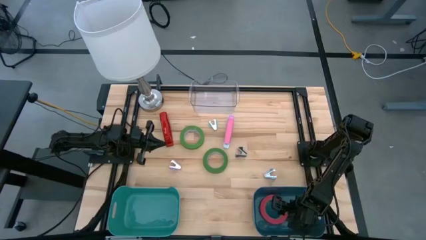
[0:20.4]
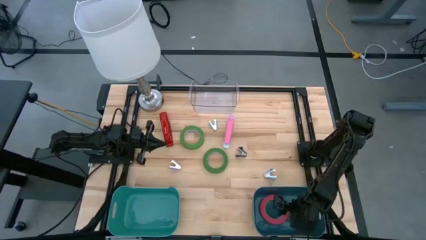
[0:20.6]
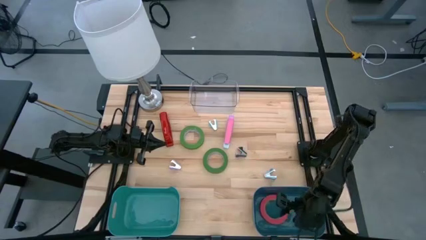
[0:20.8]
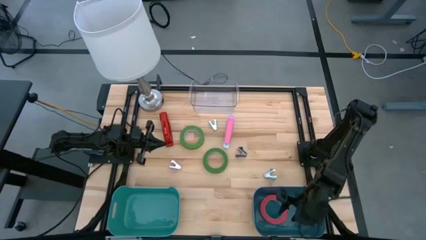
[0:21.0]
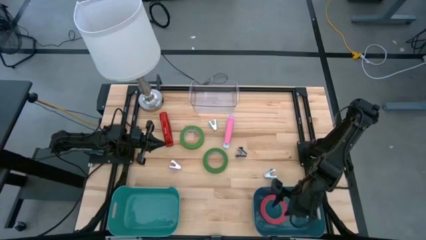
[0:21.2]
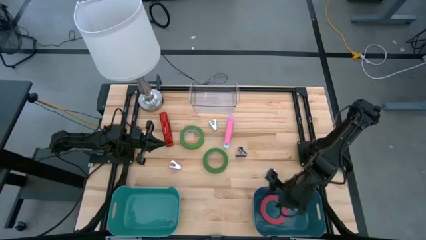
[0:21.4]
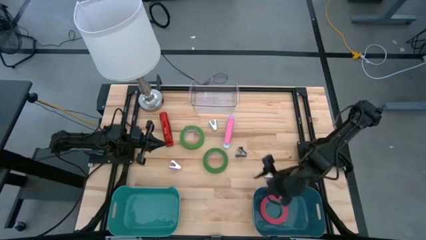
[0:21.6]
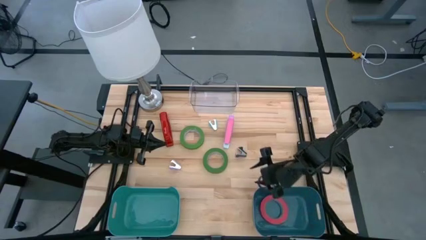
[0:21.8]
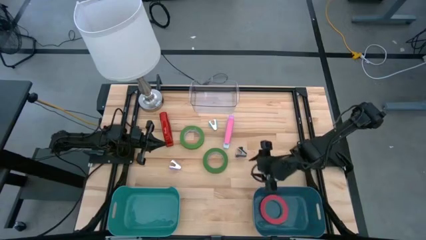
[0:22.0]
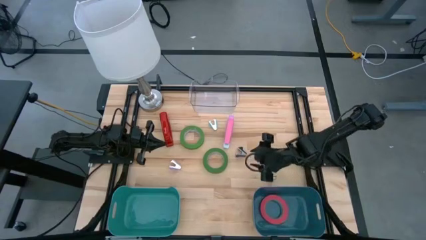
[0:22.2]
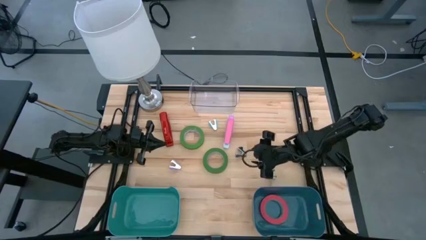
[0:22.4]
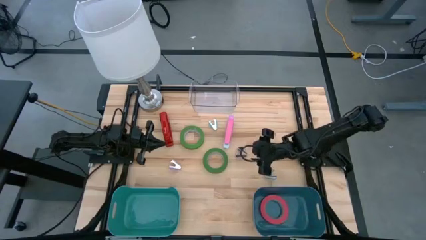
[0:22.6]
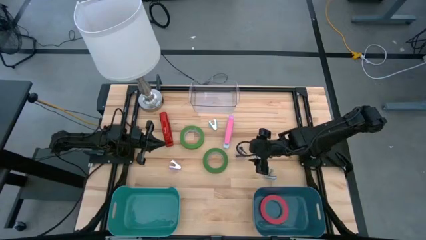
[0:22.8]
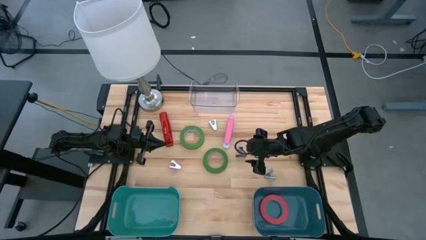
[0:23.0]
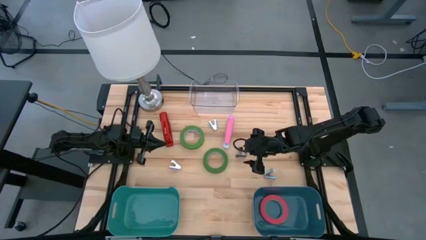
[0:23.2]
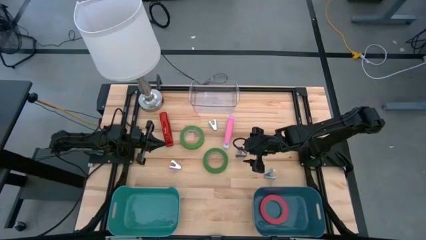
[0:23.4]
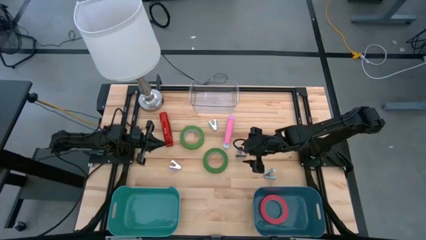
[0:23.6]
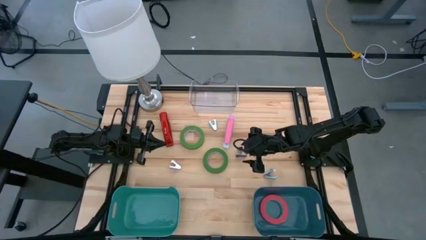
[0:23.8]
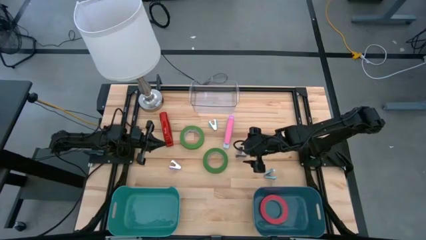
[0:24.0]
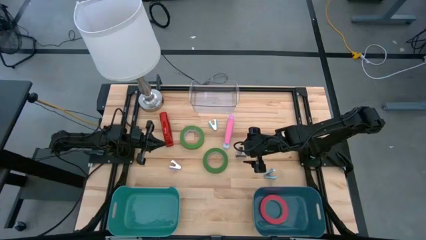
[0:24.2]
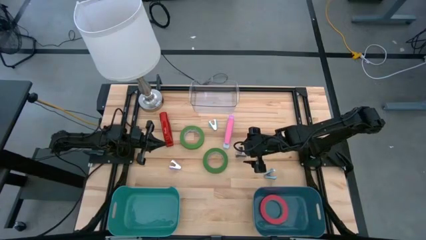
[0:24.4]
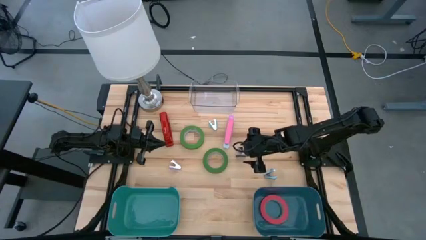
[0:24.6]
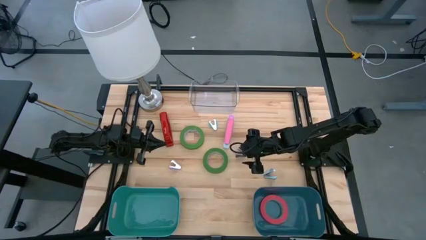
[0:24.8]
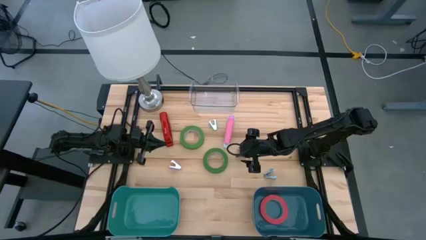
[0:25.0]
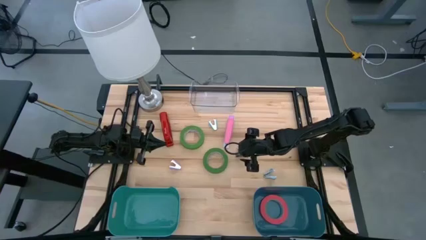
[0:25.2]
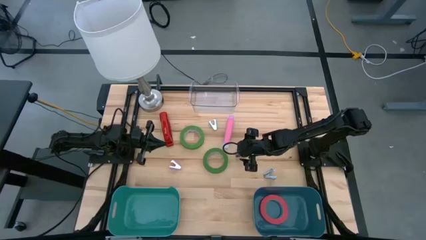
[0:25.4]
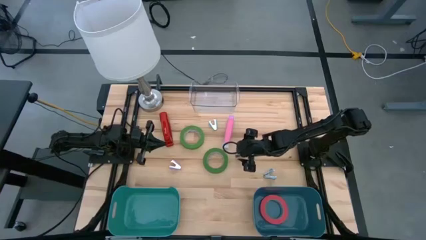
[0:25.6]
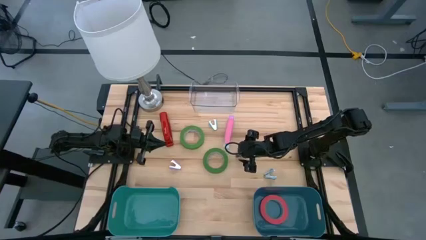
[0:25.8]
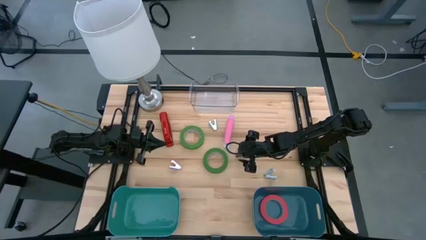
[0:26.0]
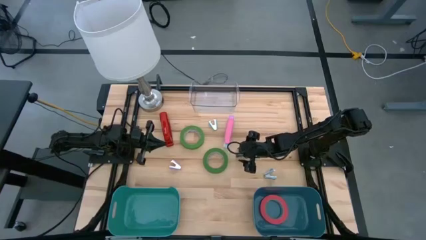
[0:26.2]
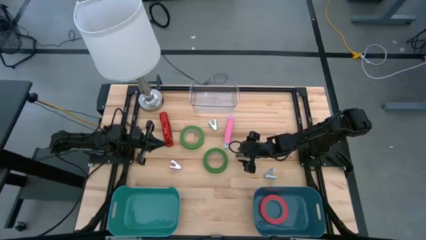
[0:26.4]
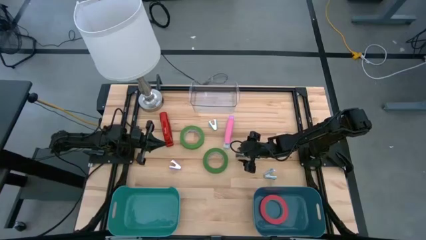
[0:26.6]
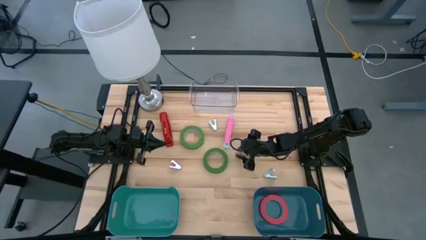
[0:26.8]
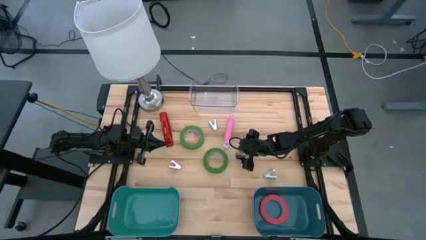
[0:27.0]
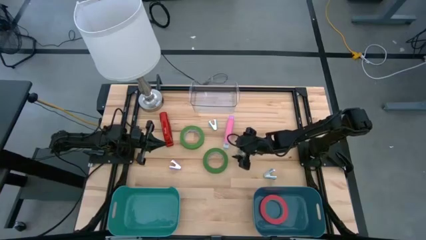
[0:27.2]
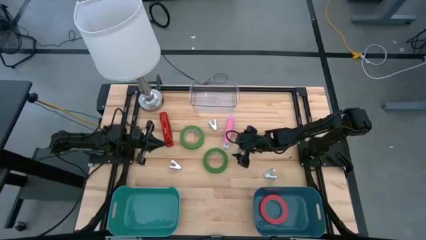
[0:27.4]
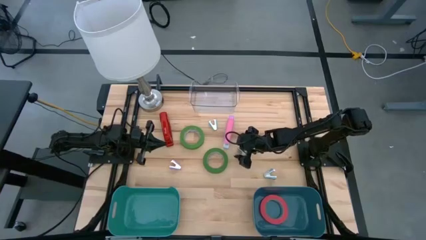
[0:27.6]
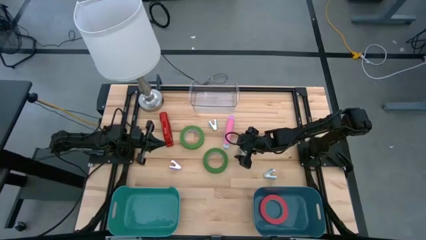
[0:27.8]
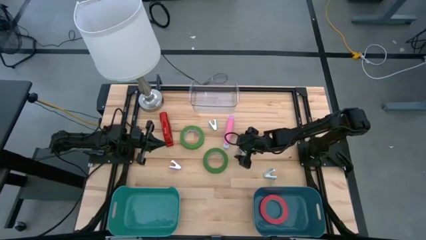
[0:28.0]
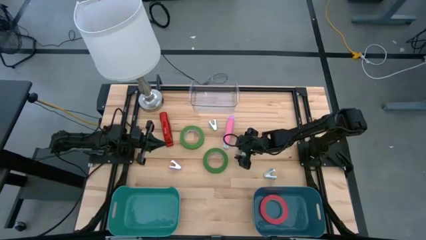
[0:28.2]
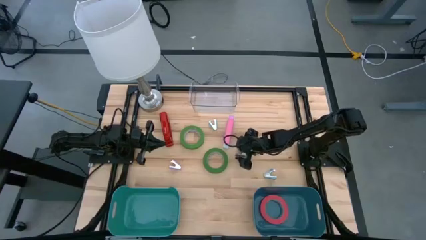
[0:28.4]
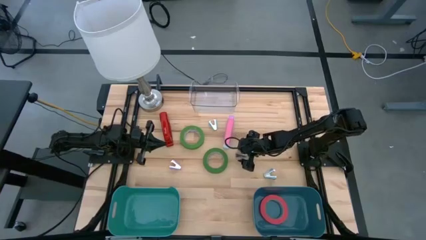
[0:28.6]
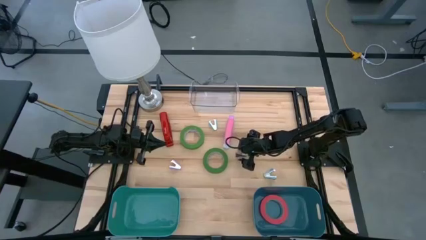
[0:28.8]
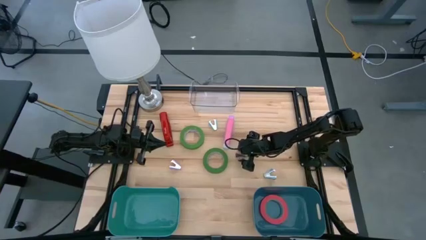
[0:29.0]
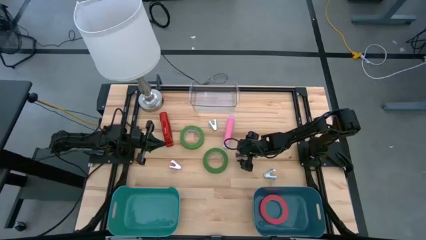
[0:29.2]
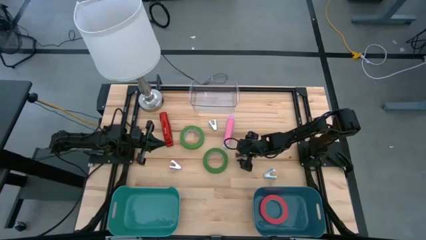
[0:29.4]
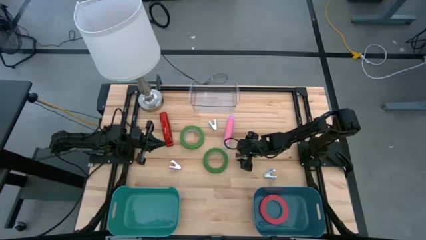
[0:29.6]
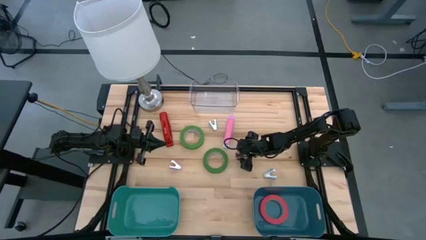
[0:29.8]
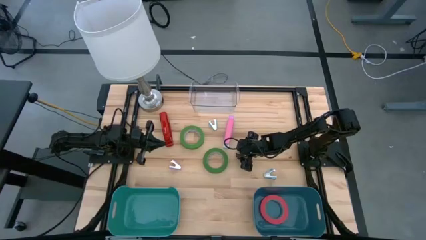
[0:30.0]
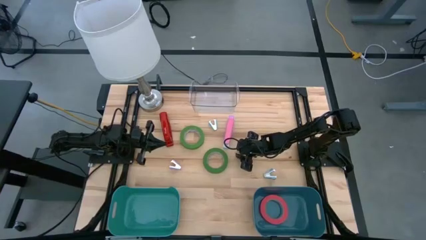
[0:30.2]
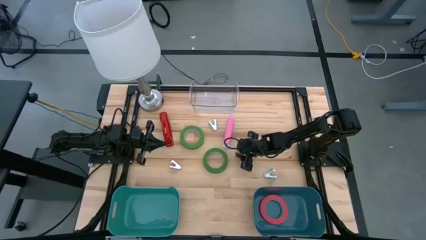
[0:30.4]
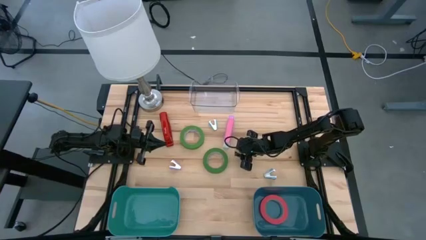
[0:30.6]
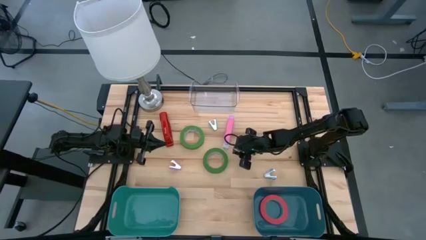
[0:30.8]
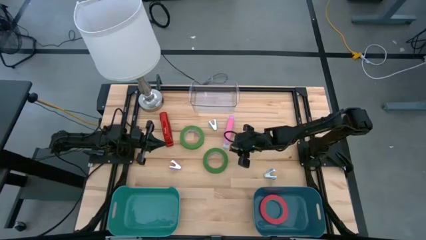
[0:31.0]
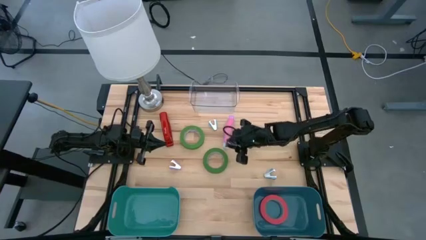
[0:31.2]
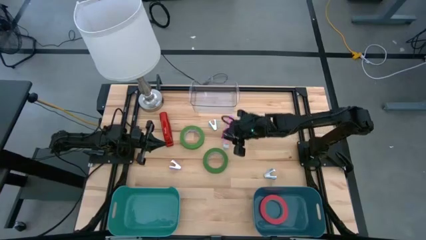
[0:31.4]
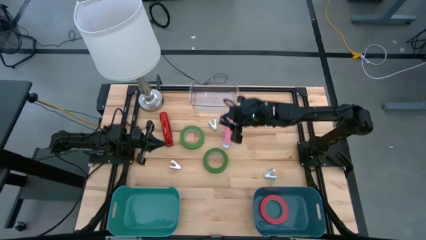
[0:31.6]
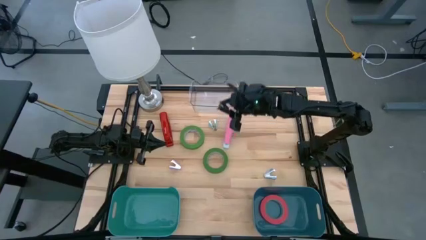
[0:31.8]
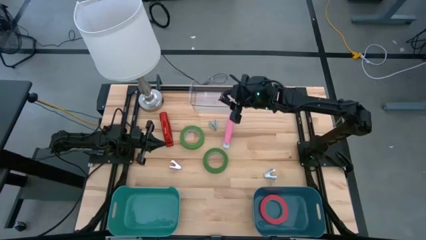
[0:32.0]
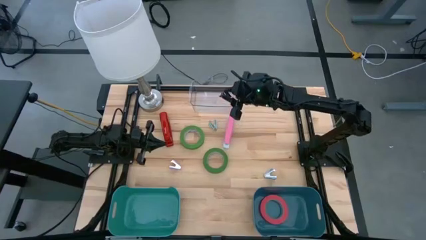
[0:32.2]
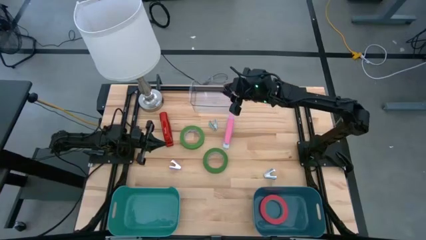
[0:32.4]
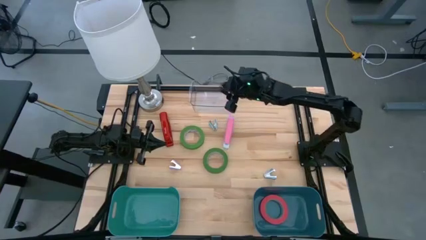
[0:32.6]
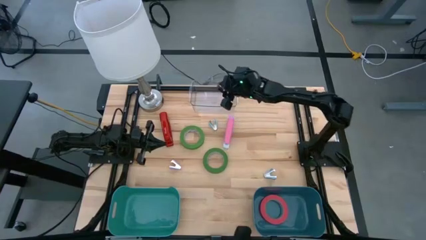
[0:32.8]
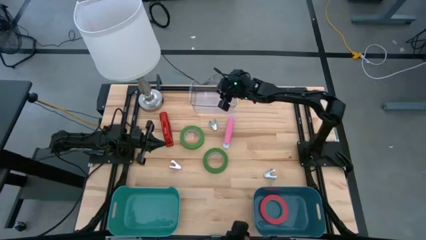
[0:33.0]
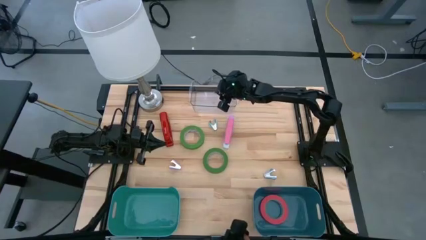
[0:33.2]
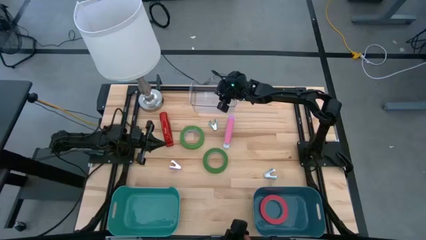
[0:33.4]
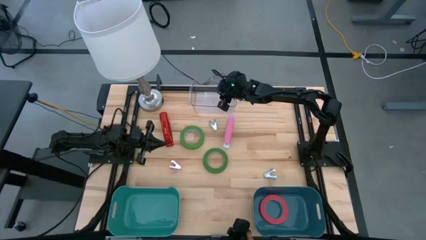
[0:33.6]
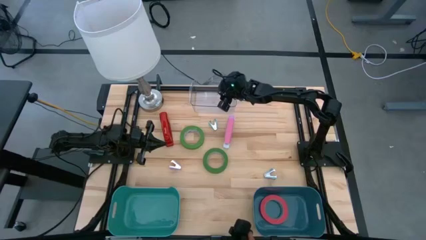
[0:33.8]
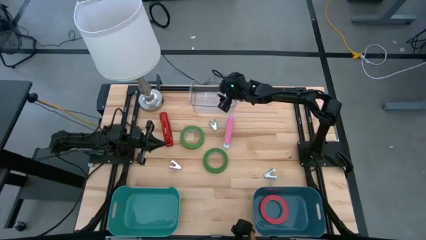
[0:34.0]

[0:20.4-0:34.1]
Task: Pick and place Stapler, Stapler remover, tape
Put the black staple remover into the transparent bin
